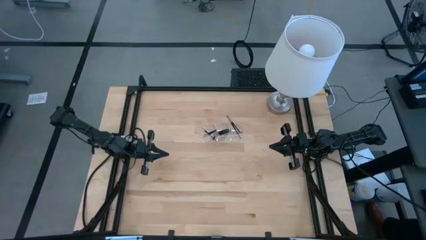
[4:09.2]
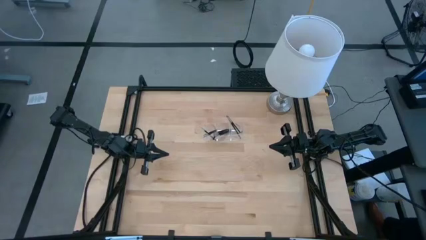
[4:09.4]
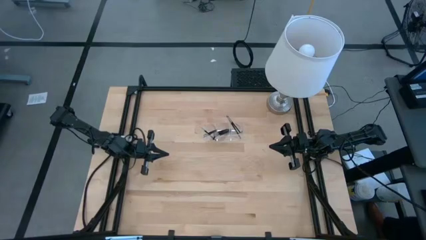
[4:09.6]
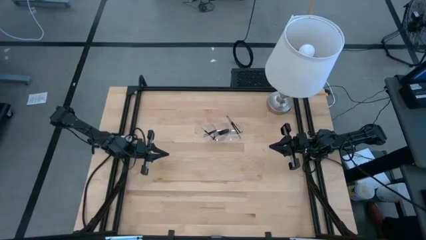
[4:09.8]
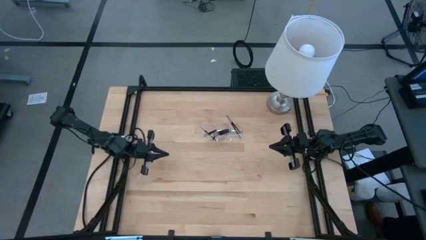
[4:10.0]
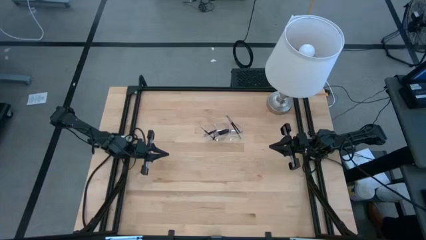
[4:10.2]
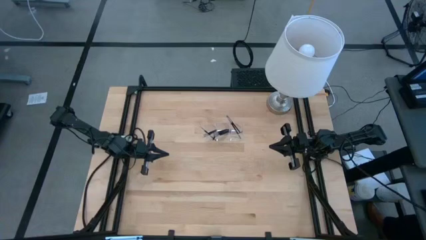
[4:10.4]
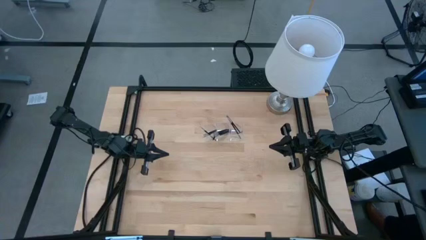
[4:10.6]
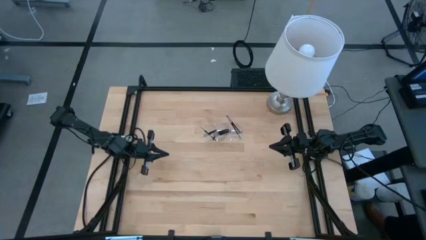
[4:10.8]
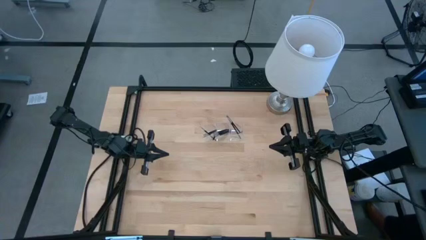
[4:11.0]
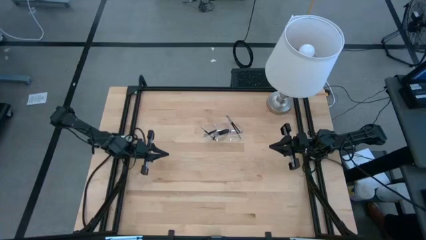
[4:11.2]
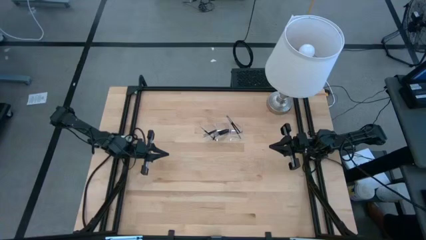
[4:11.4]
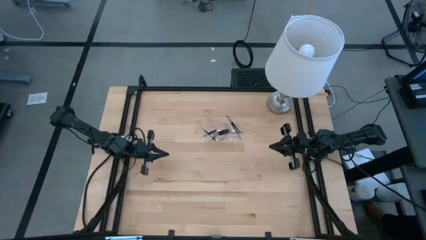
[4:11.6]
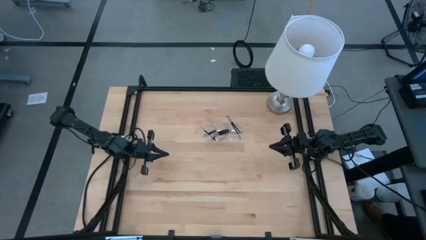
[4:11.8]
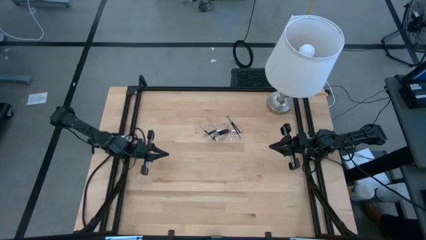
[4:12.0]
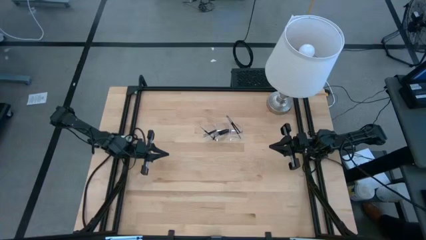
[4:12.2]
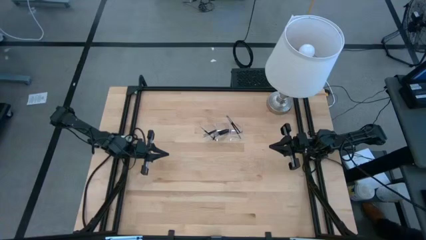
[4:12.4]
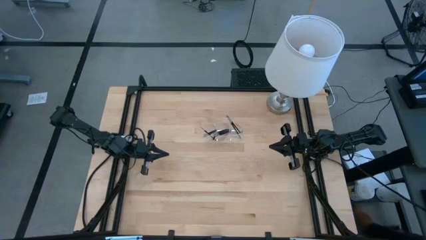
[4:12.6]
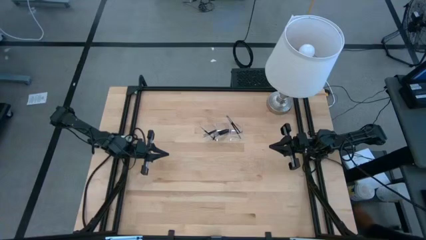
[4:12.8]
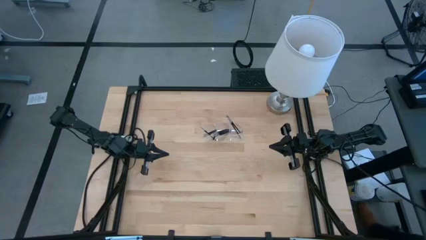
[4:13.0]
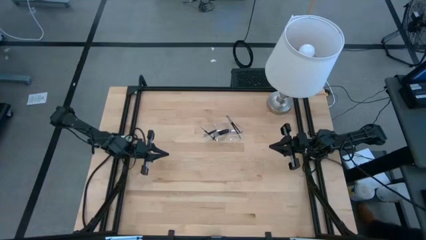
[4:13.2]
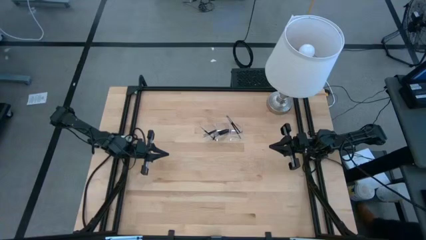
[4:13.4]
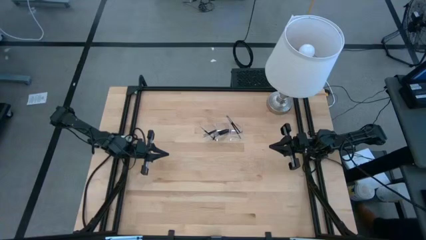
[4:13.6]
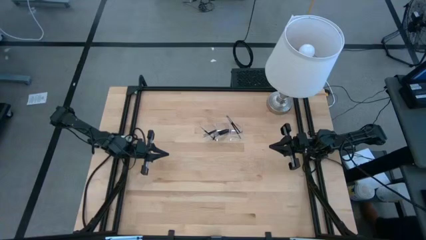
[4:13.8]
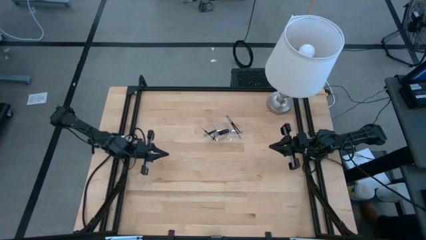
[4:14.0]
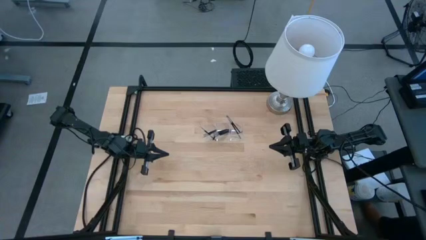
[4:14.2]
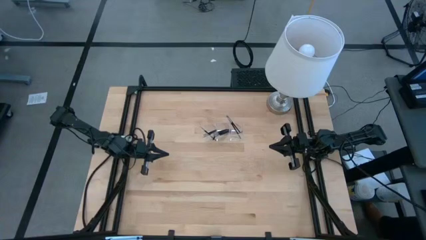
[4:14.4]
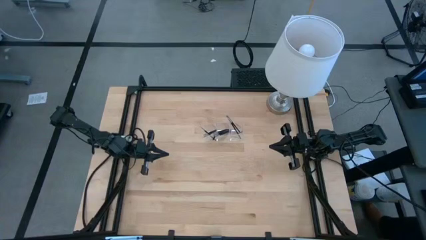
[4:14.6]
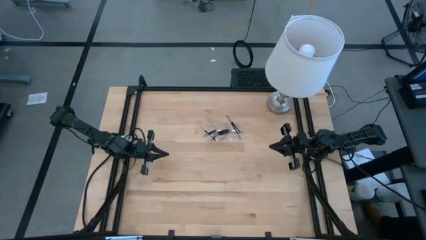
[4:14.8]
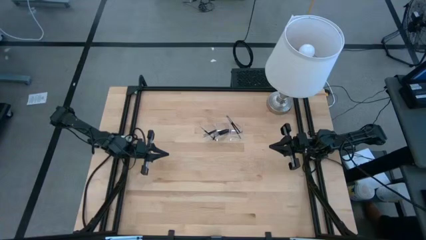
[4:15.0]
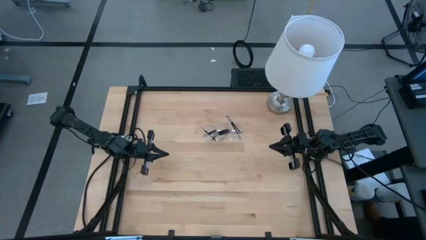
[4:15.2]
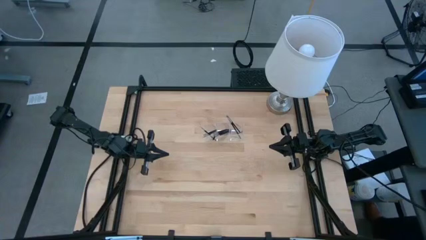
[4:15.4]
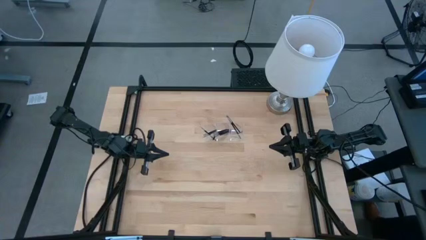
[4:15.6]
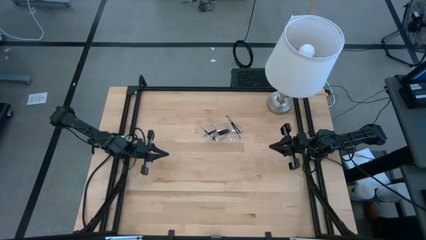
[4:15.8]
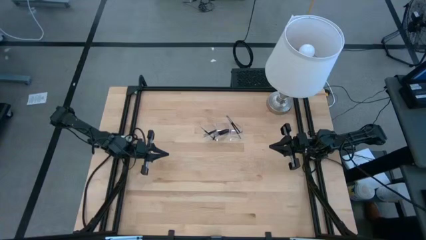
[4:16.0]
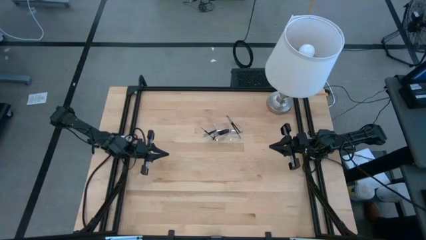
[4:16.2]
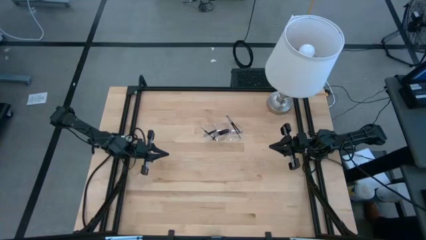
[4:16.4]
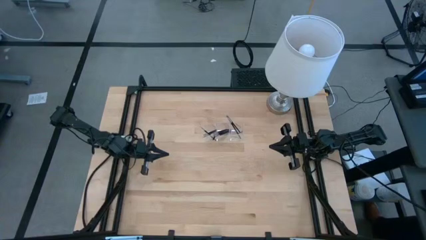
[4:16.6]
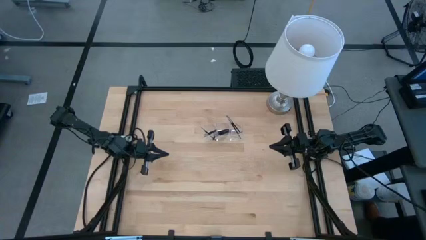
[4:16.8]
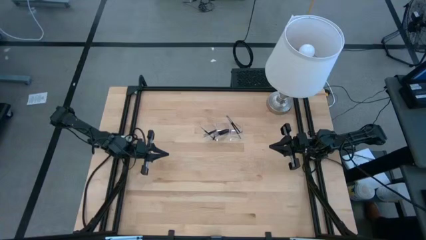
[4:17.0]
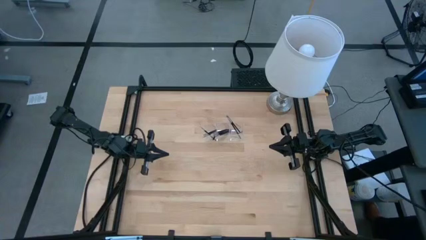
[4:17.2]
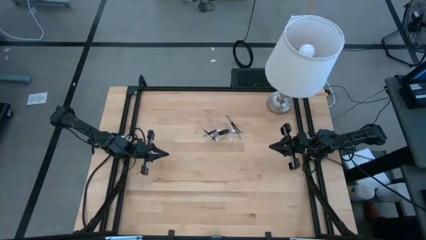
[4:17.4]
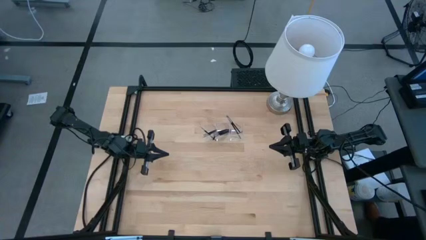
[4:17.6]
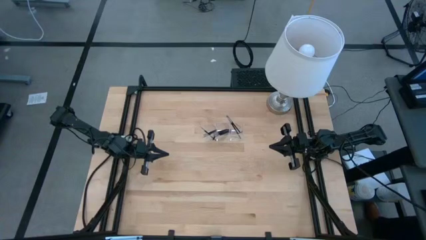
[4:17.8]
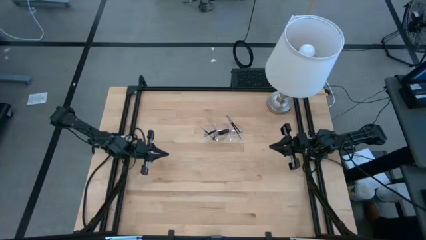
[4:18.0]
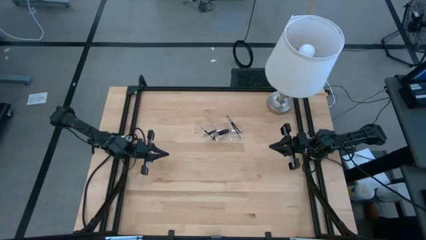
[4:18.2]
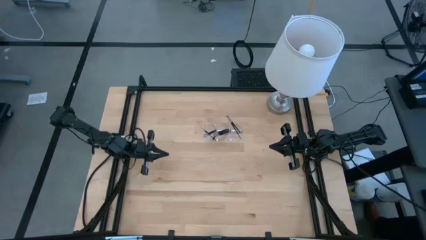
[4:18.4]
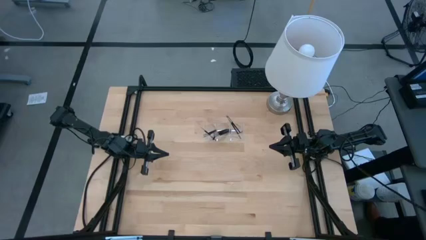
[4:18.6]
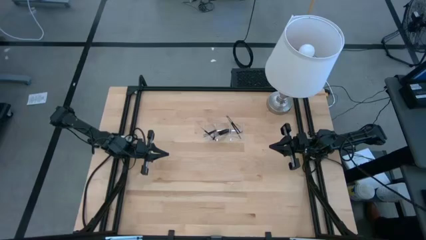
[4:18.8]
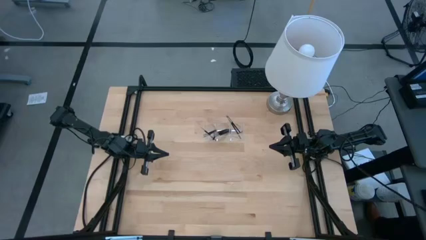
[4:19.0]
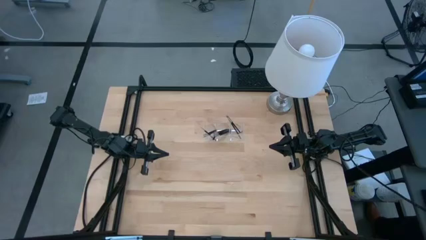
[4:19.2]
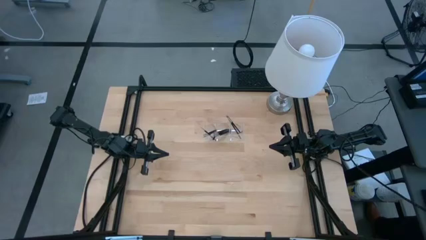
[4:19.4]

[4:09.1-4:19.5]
Task: Pick & Place Makeup Supplies
Return to Home Position

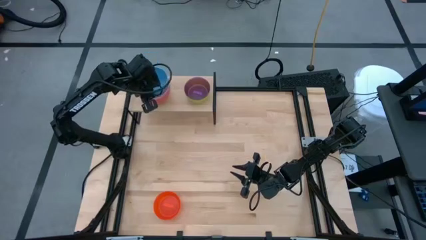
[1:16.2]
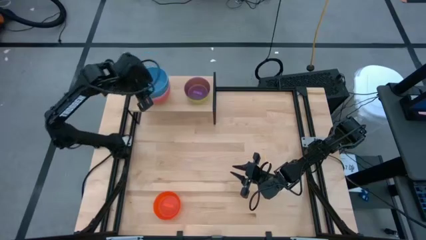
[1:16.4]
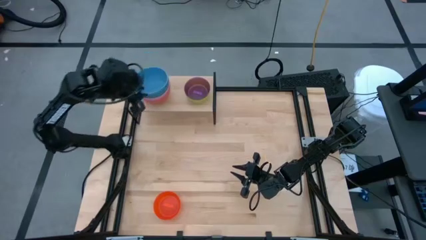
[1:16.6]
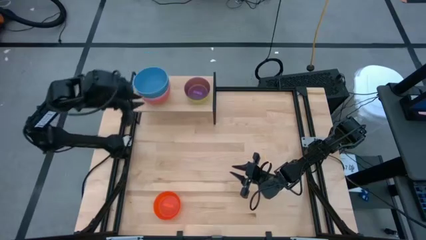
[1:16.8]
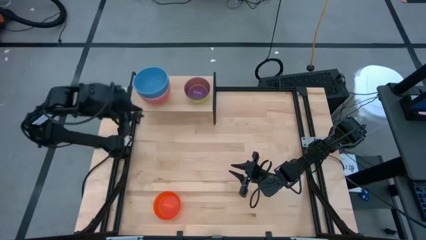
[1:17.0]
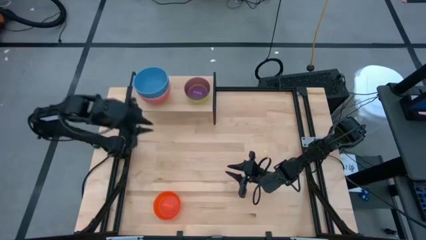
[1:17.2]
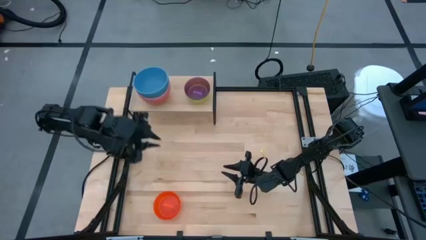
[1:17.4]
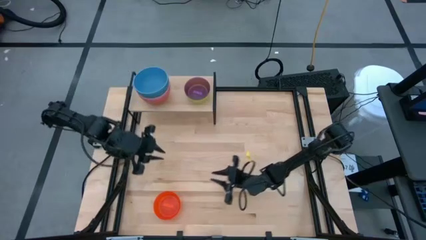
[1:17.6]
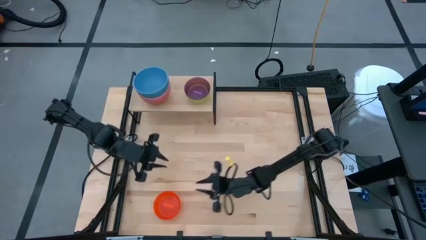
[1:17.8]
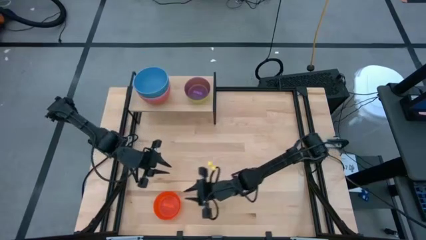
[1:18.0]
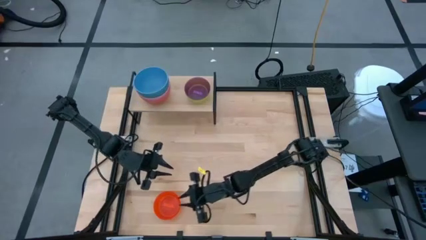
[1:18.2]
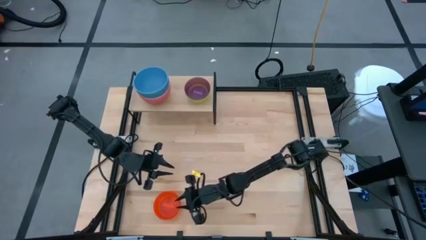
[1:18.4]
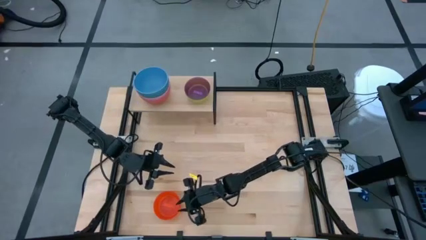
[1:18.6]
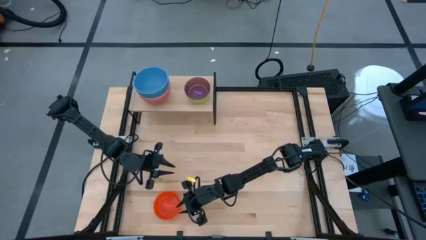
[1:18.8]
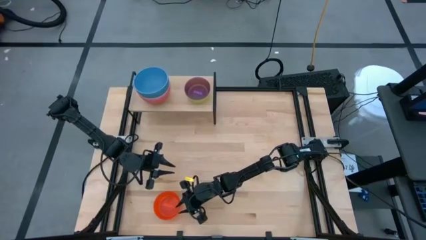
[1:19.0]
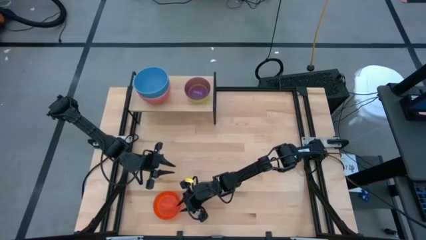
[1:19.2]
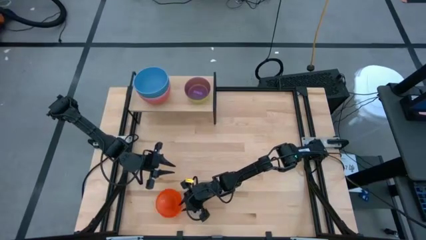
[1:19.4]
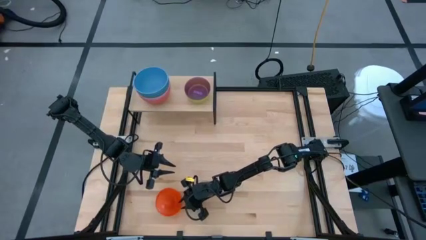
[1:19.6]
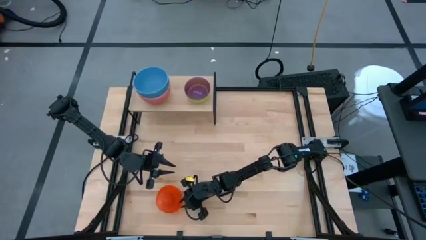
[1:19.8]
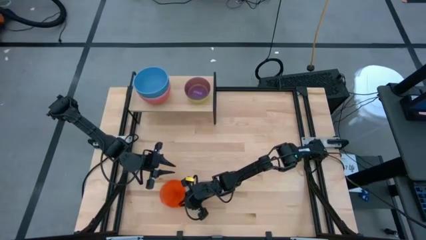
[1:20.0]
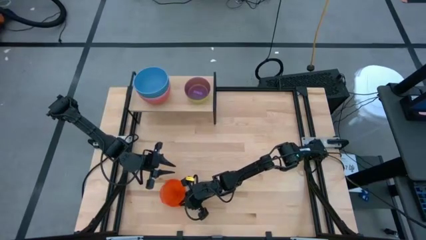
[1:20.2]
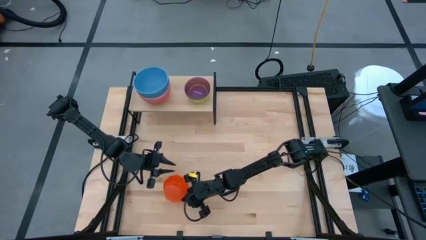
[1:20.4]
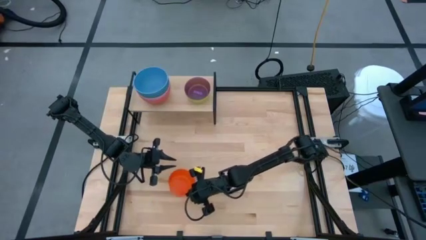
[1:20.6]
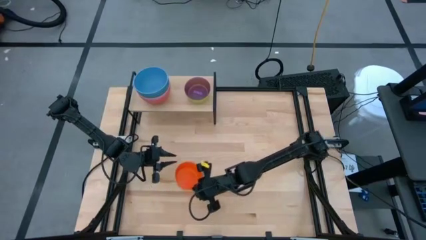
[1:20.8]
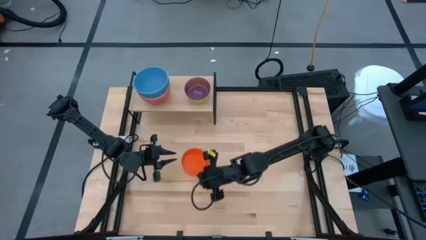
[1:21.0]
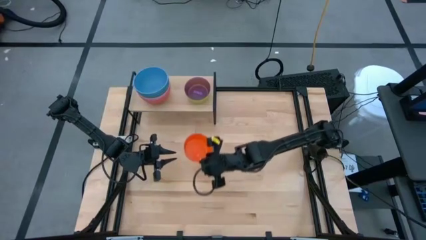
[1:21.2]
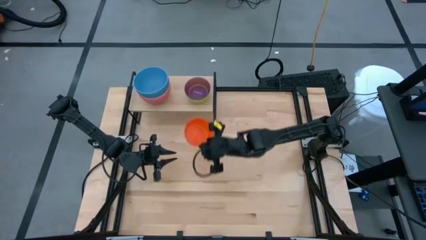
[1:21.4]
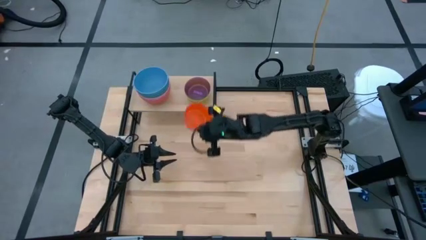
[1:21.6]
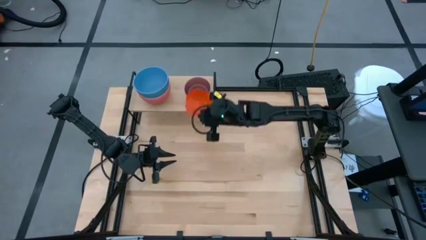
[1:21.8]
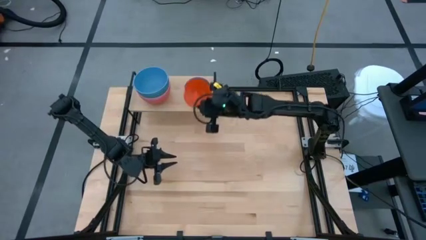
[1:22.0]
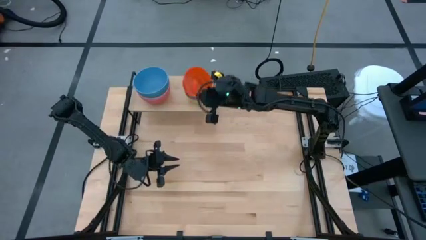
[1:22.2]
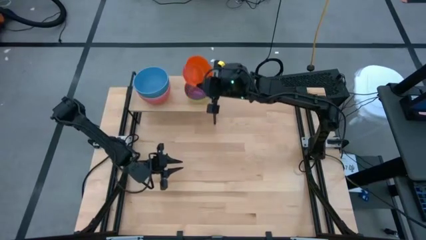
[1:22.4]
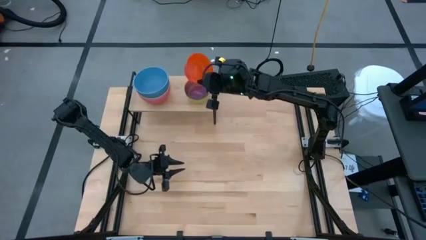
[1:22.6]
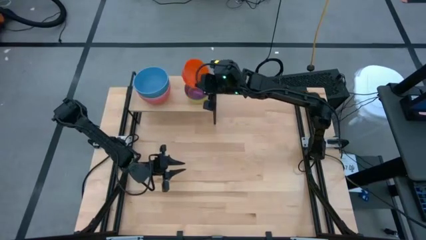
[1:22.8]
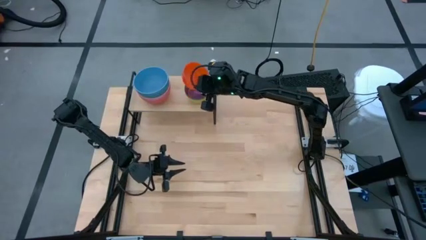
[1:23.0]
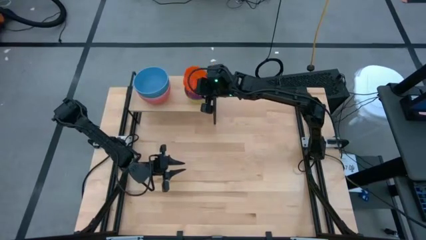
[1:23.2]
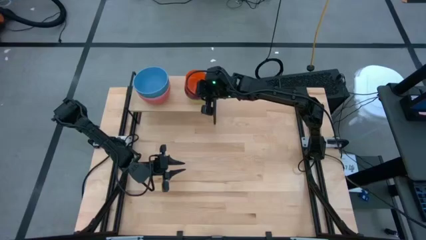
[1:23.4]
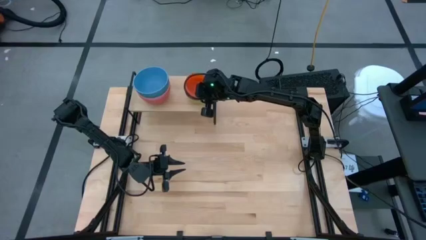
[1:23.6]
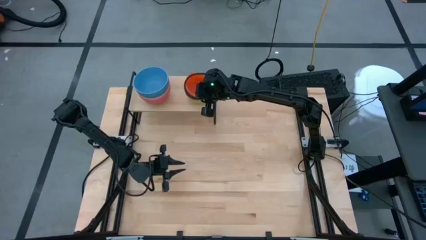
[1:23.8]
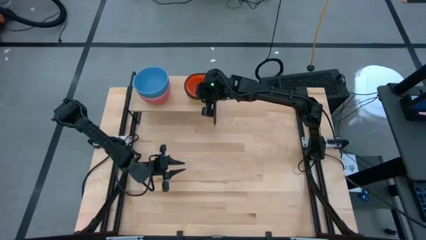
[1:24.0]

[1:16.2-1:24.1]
Task: Place and stack bowls onto a shelf
Stack the orange bowl into the purple bowl on the shelf
